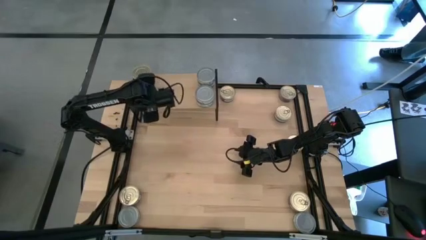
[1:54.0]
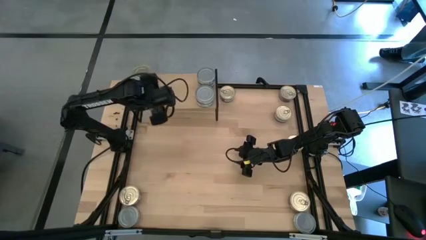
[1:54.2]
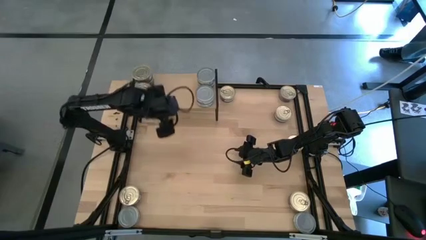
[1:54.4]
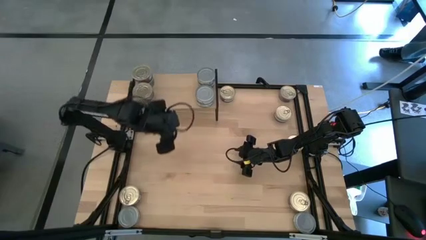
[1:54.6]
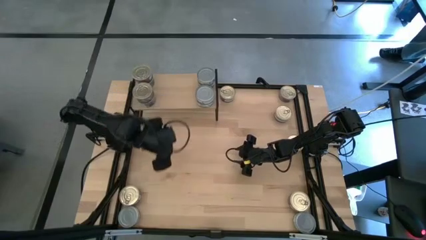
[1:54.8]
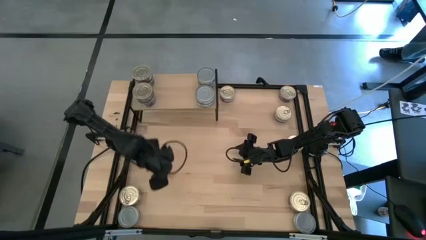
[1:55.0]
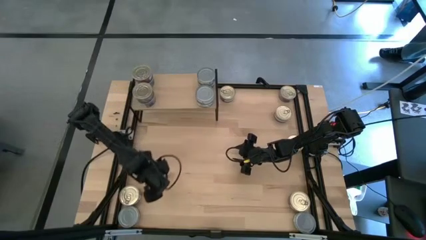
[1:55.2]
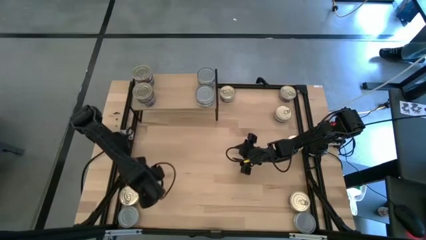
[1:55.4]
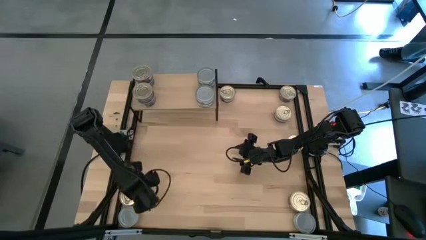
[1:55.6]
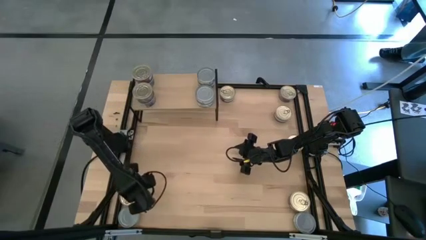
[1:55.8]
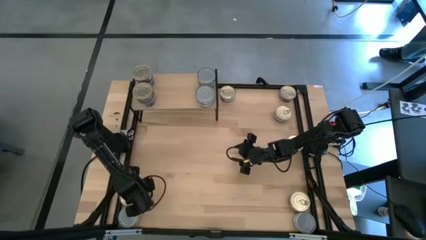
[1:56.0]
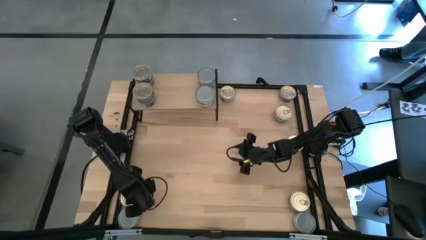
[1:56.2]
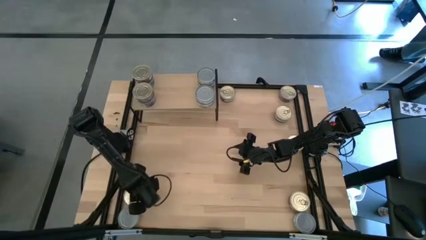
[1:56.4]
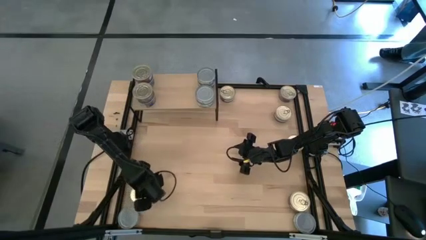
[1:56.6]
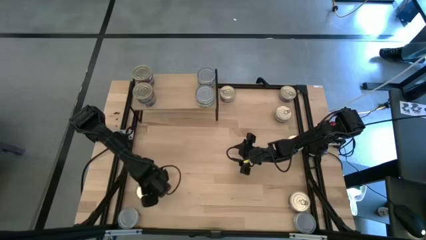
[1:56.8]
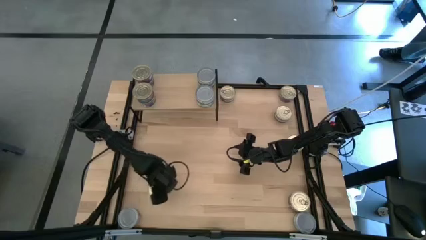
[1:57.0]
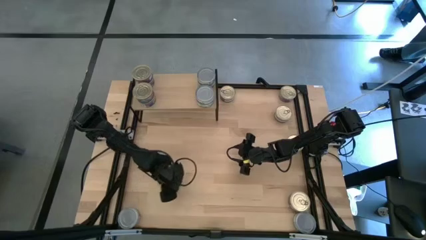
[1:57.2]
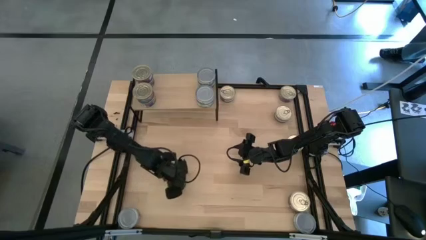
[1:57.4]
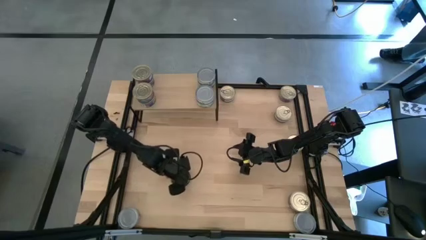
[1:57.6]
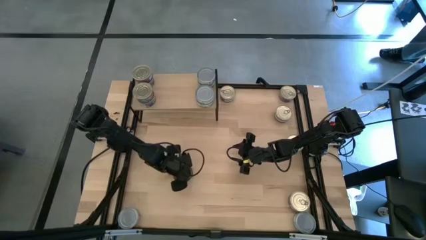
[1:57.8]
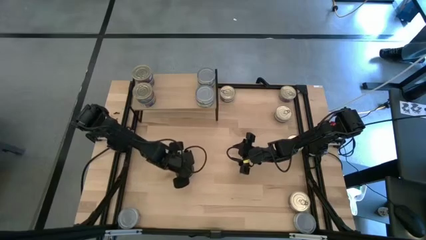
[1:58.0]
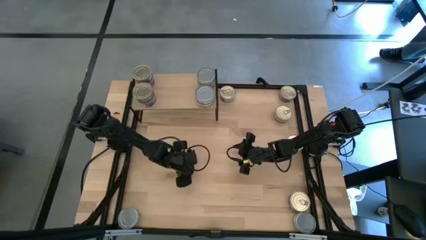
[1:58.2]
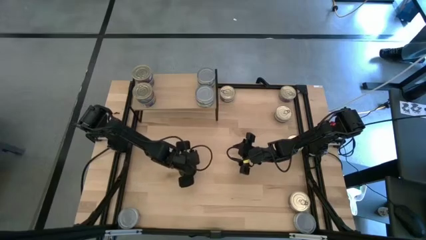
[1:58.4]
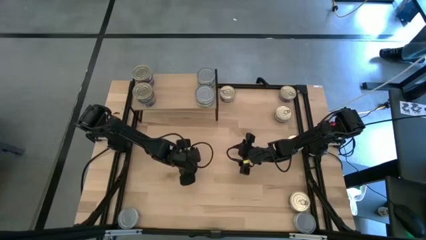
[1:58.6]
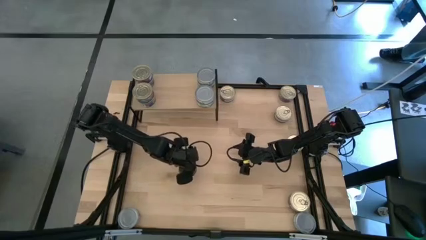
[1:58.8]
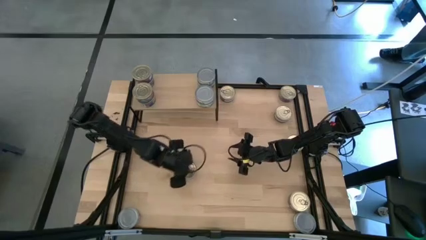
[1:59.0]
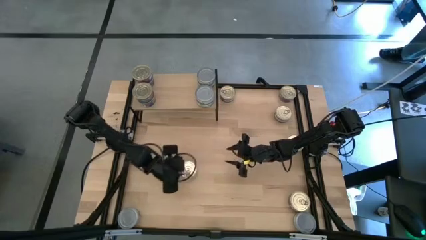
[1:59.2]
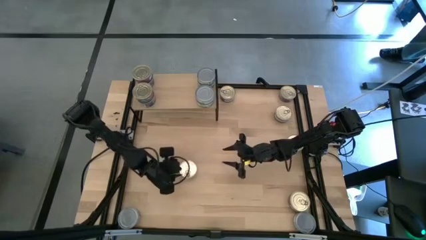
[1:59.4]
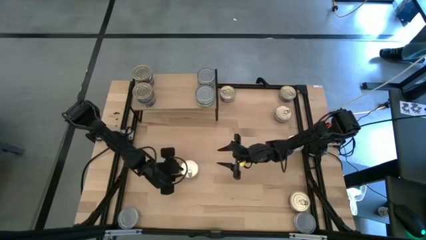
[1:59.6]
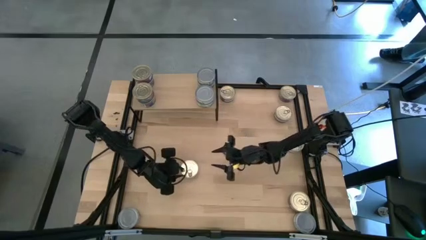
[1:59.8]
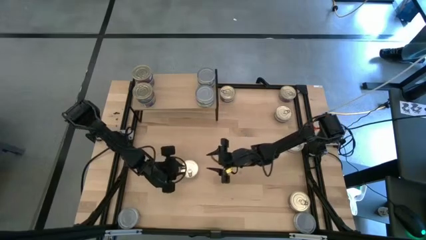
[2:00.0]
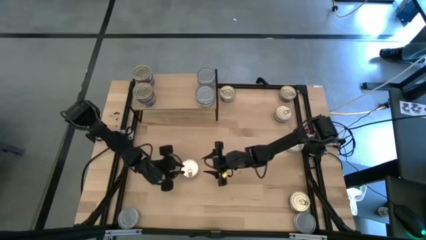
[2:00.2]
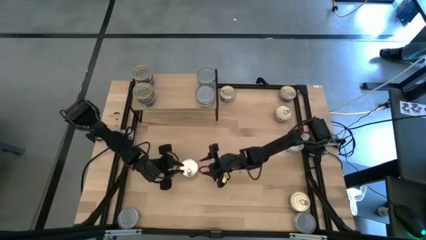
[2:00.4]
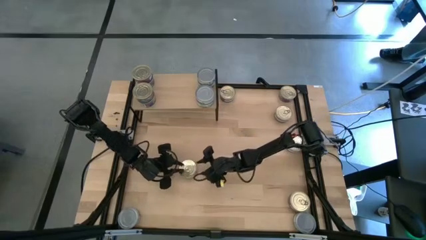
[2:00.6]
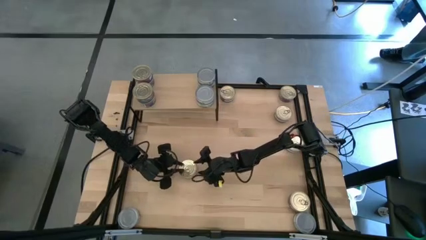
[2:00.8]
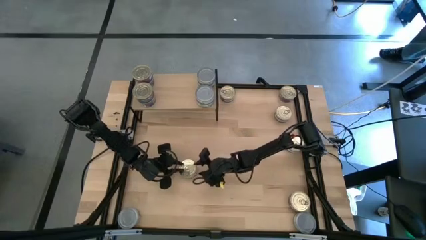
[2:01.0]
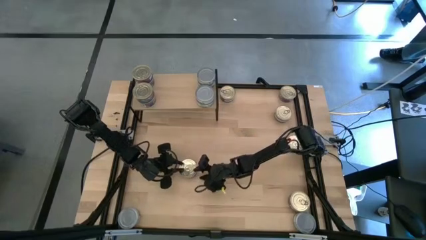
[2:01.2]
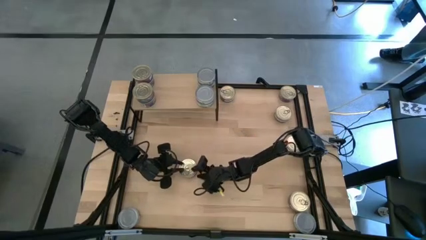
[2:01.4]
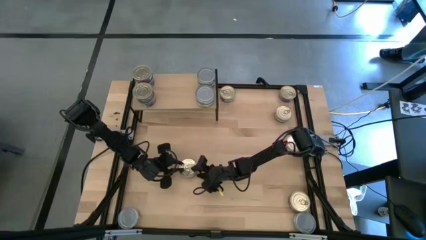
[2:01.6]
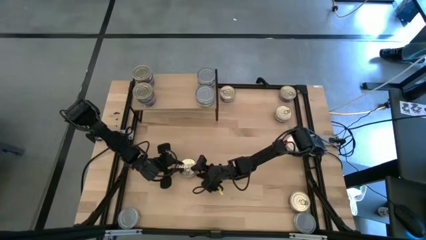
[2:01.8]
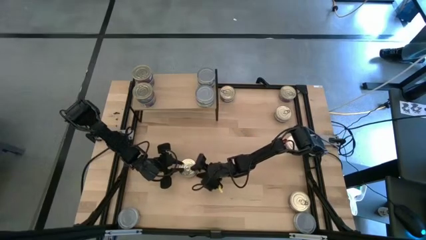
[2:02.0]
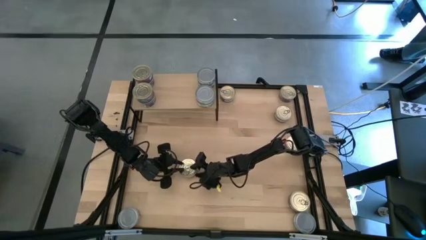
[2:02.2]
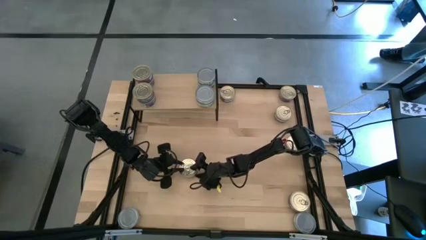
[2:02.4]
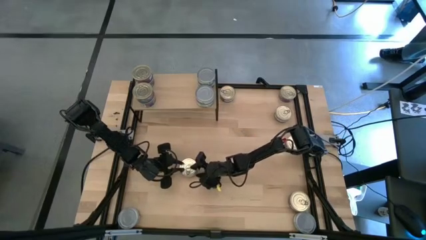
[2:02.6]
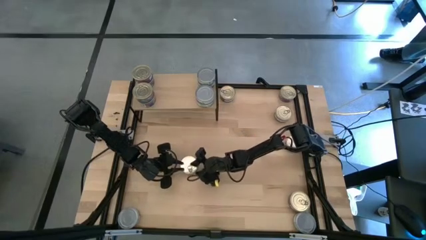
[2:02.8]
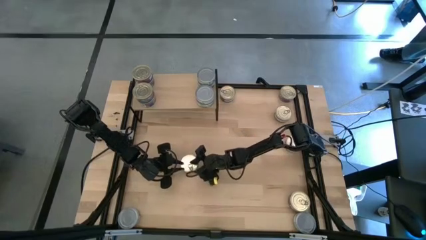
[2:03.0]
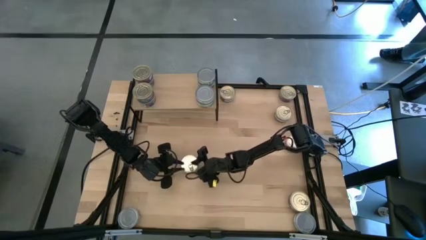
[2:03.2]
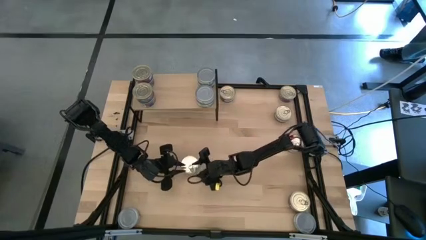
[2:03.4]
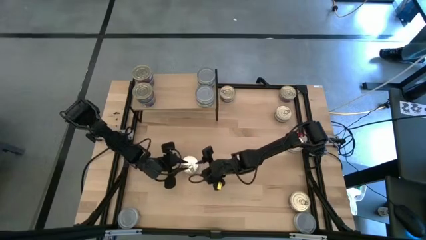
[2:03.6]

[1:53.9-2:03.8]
Task: Stack canned seafood by type on shelf
Put the blue tuna can on the shelf
